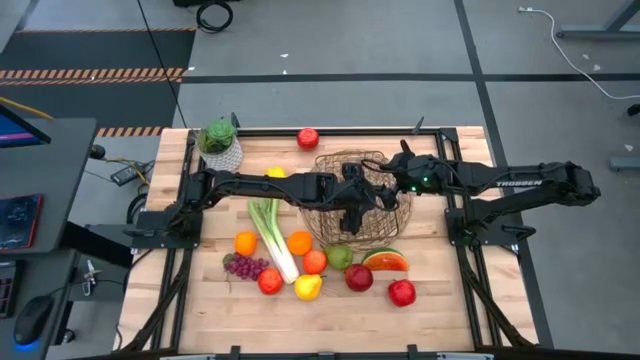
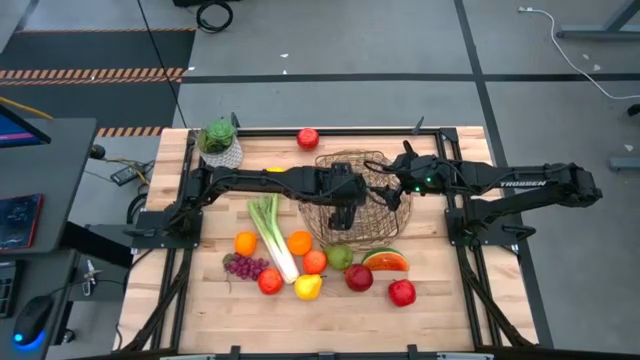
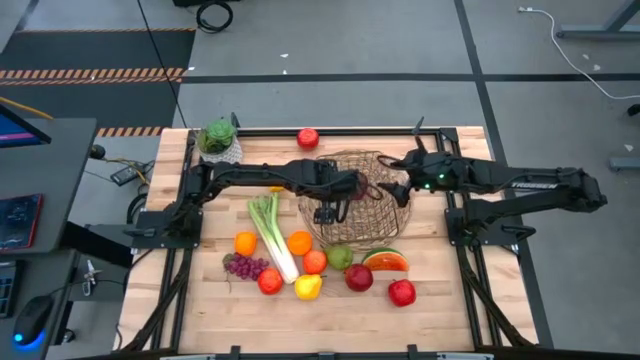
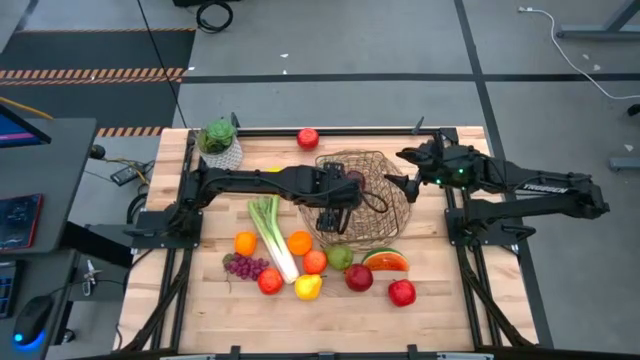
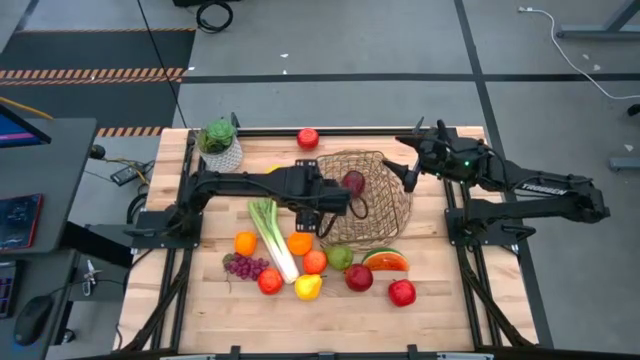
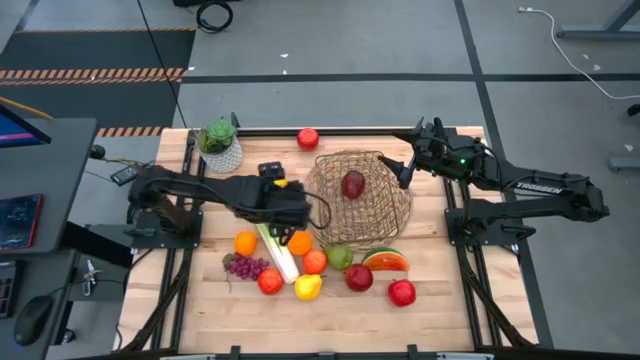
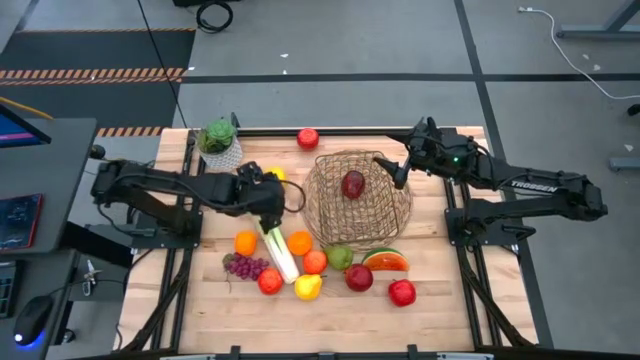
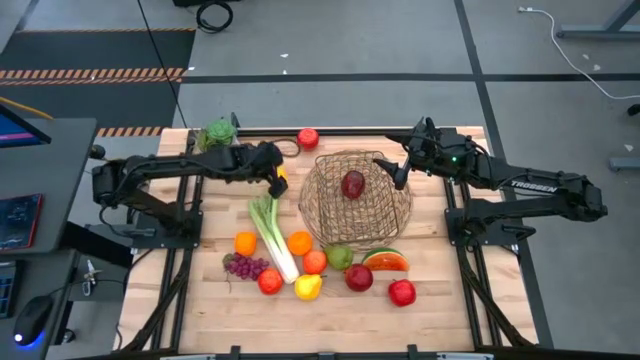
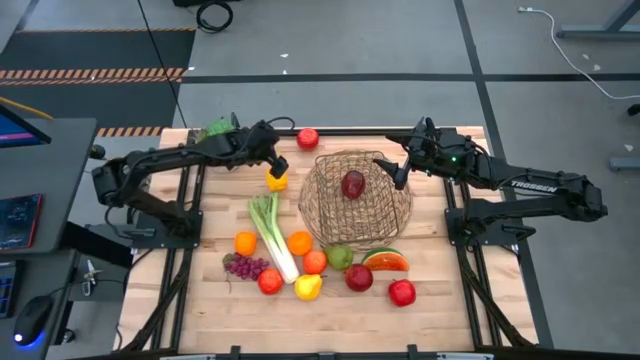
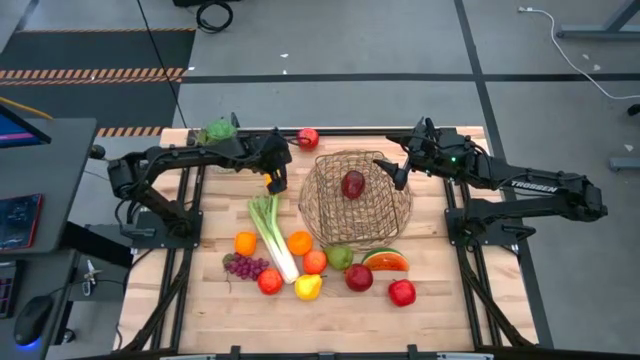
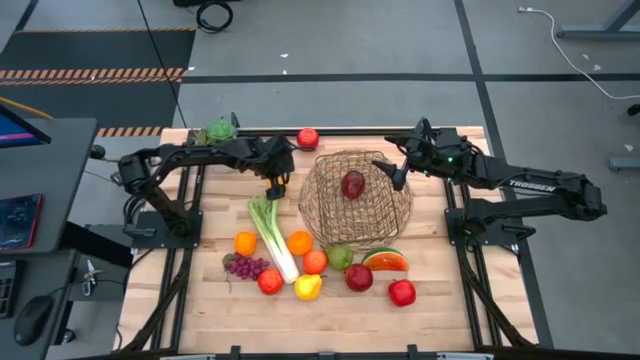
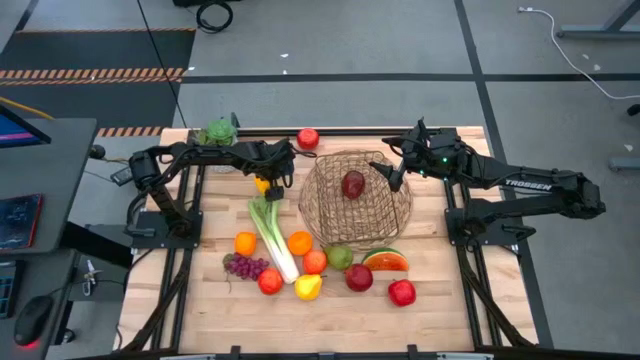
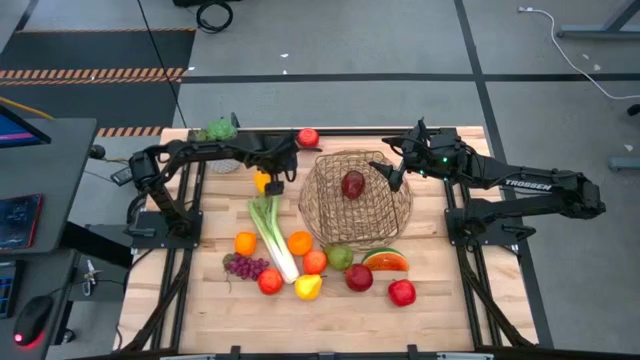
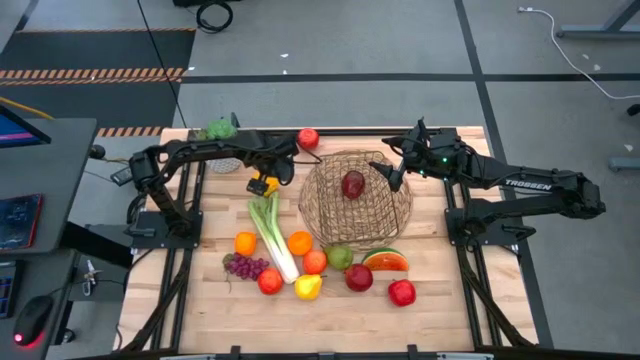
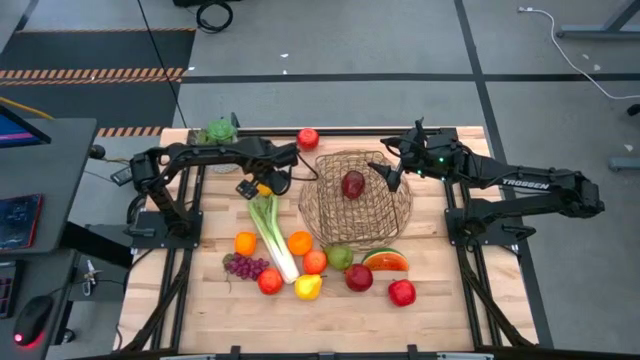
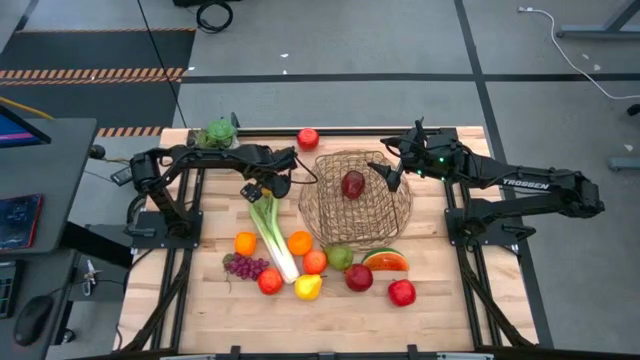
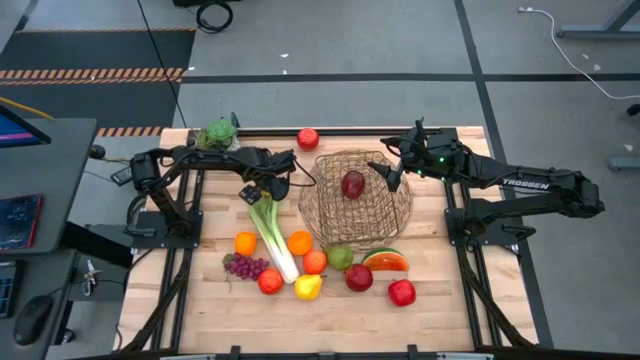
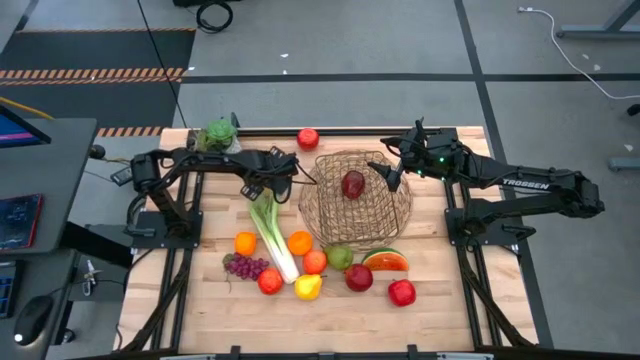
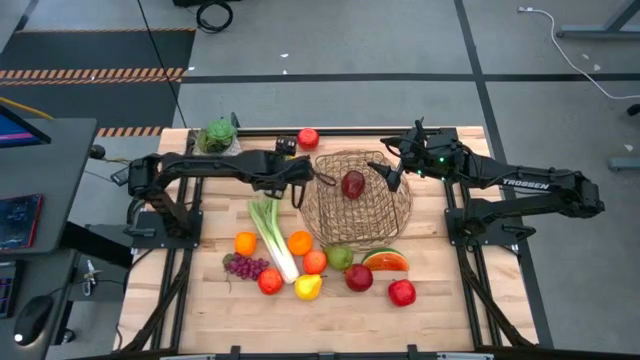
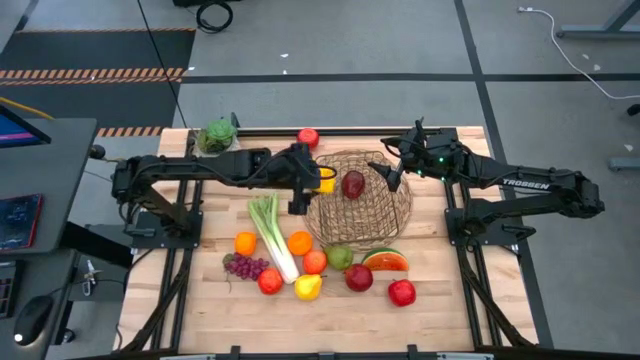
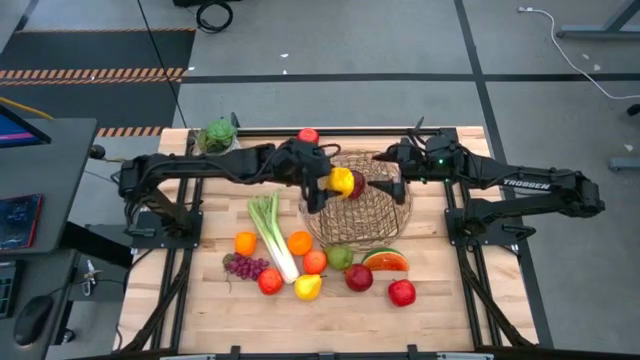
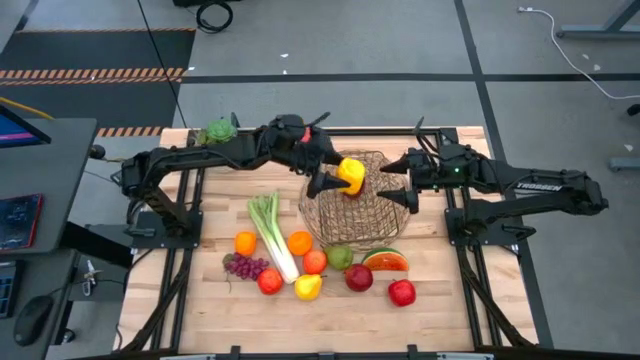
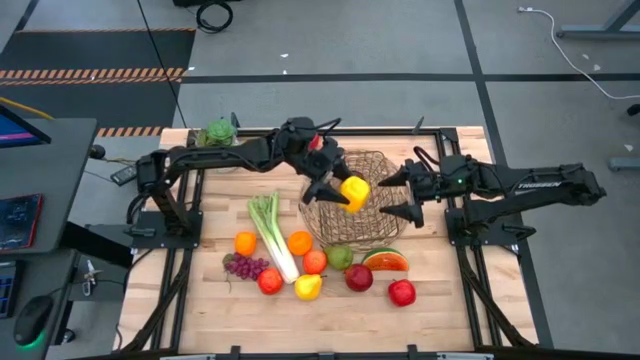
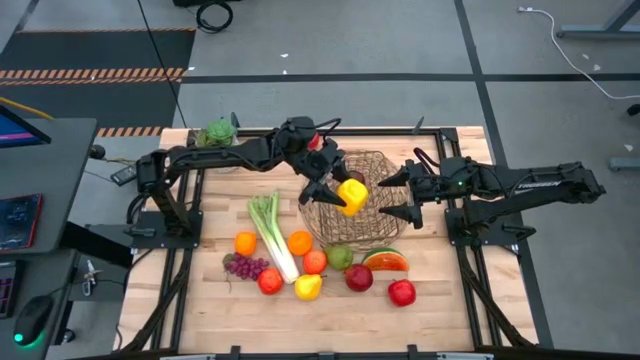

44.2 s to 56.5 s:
Task: Build produce basket
Put the yellow bell pepper into the brown wire basket

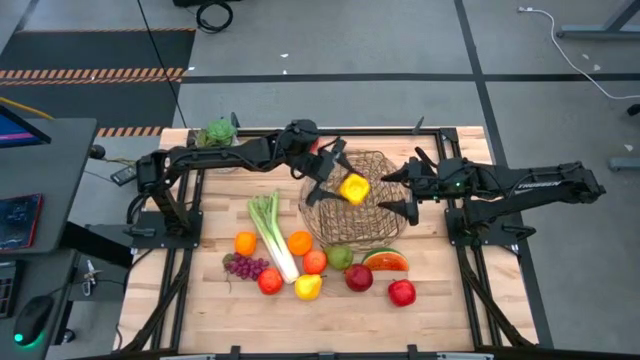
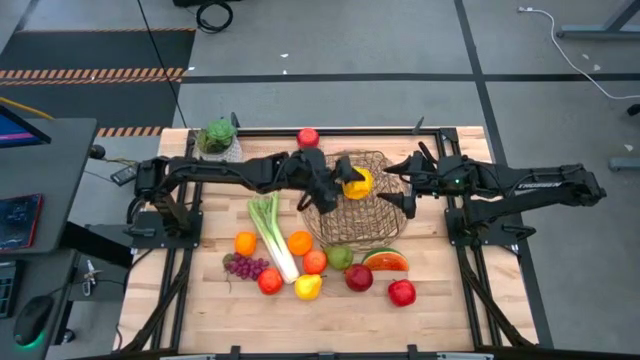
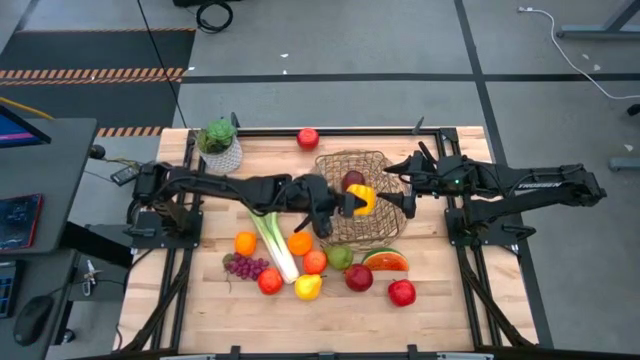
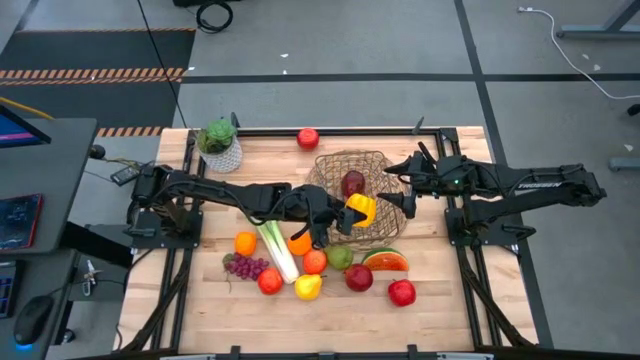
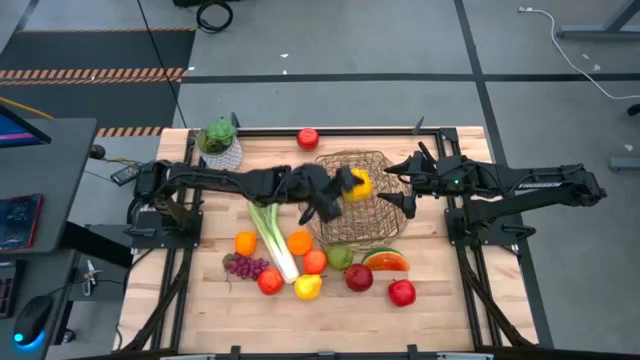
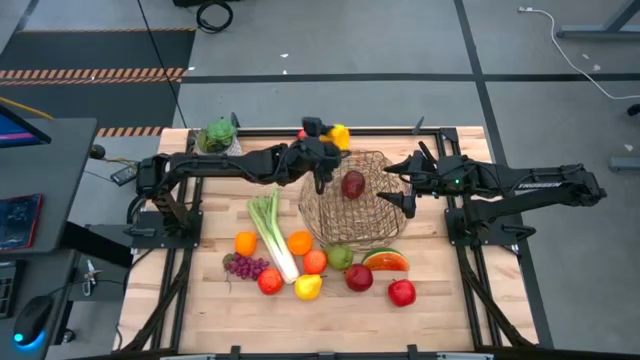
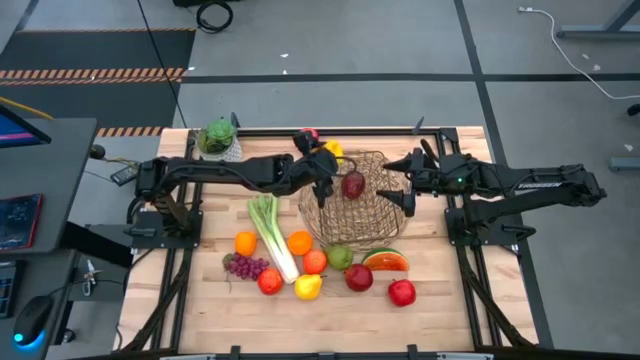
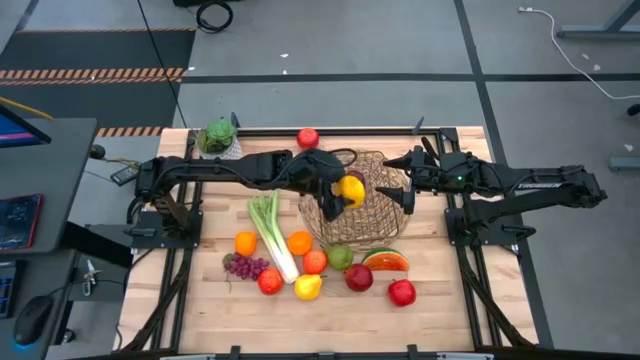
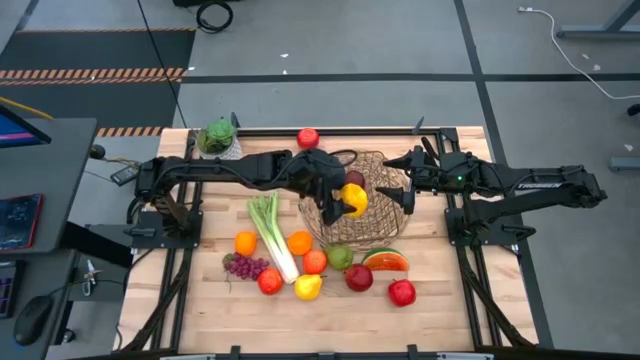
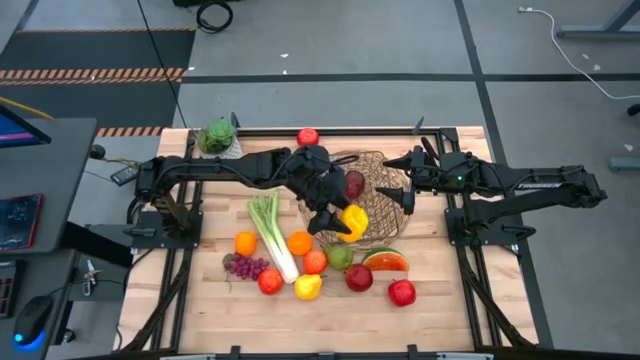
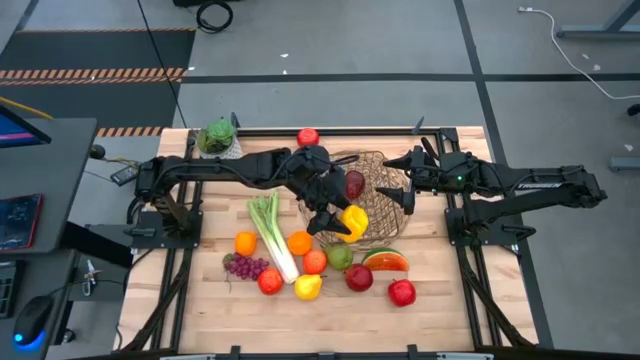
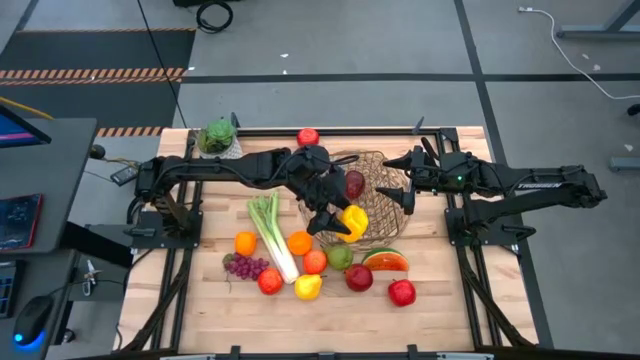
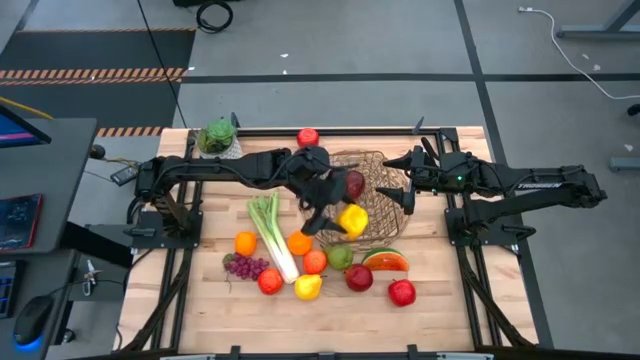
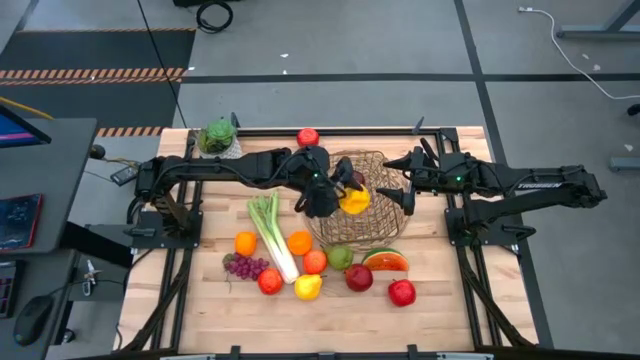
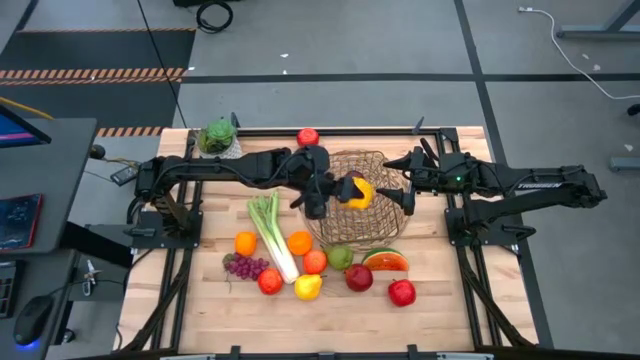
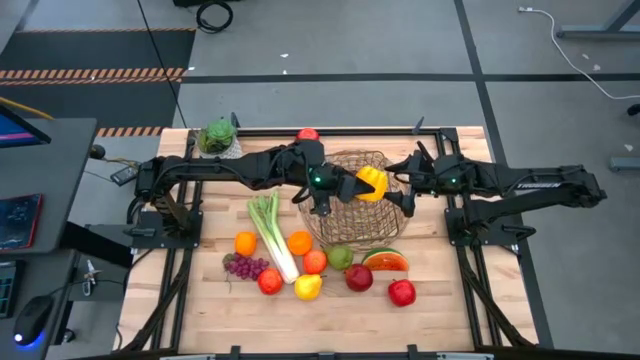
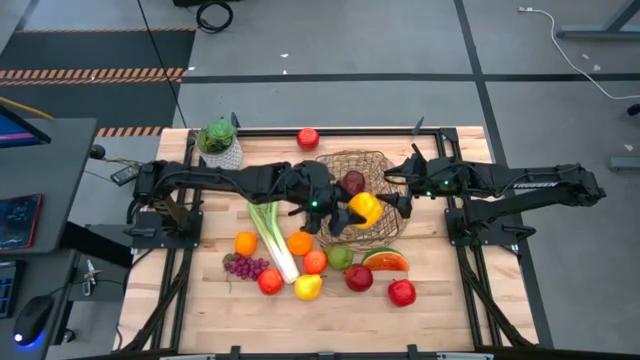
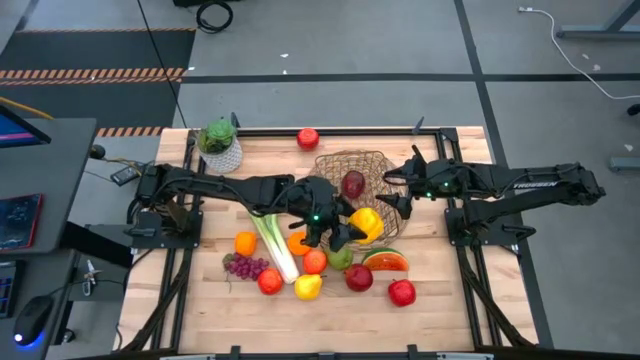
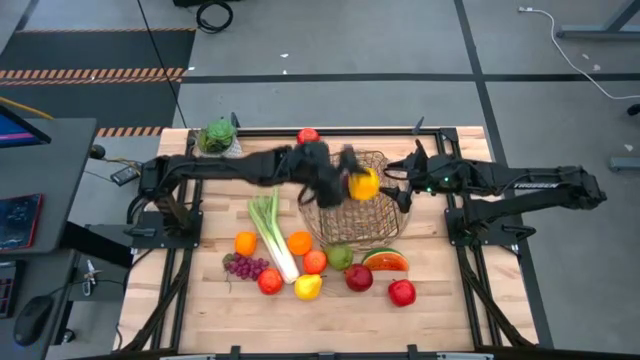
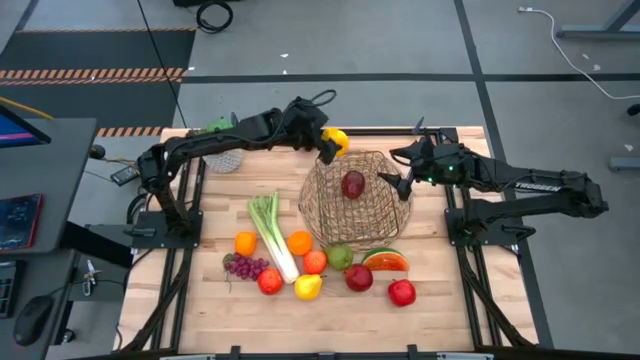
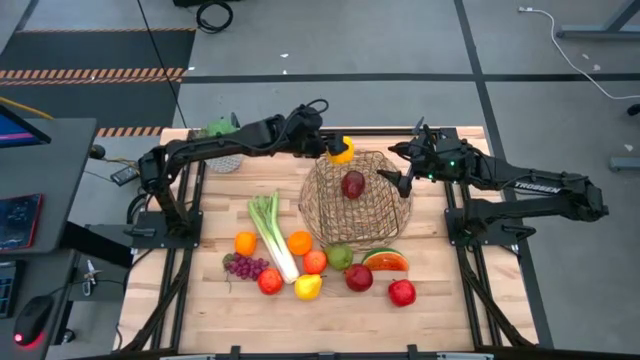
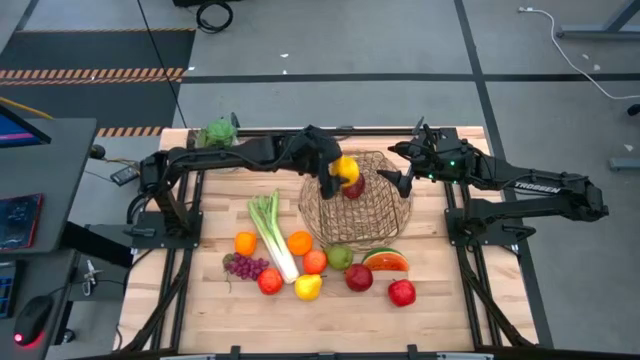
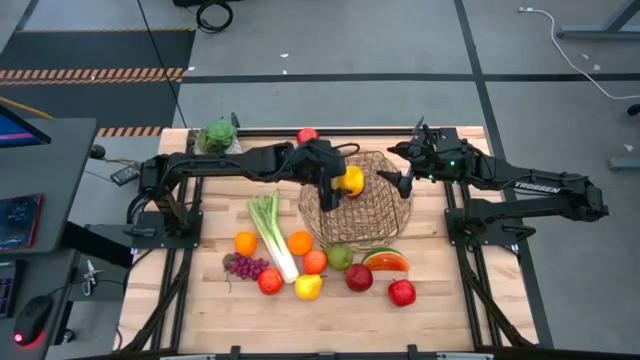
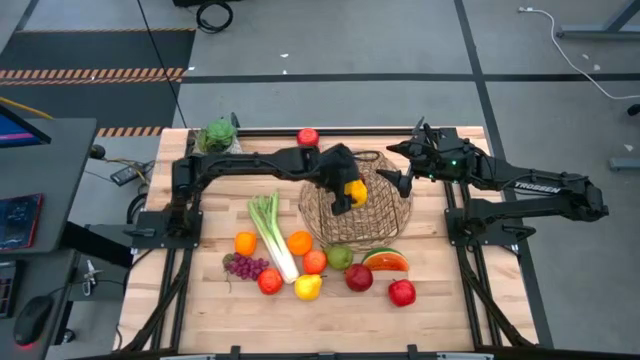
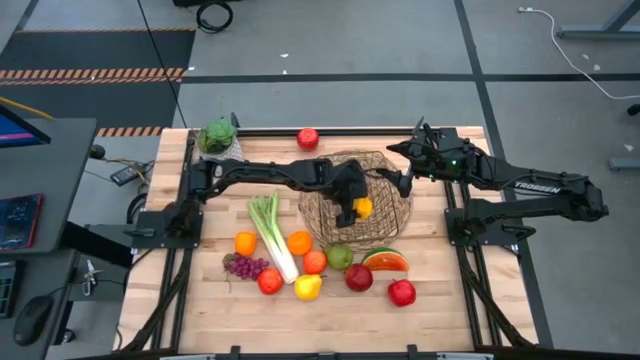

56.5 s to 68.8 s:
Put the yellow bell pepper into the brown wire basket
